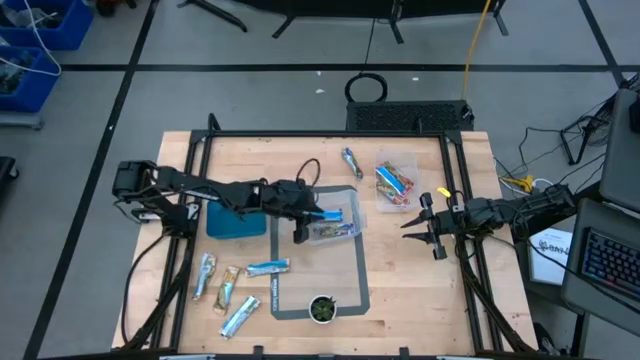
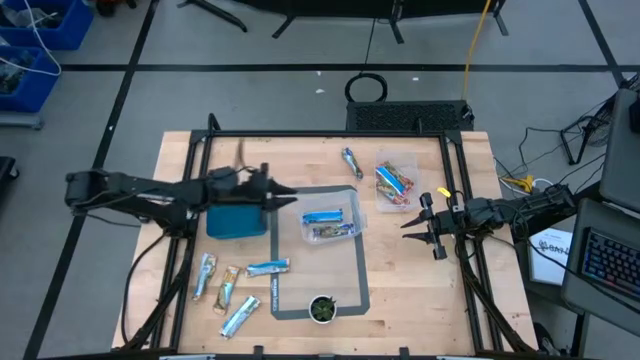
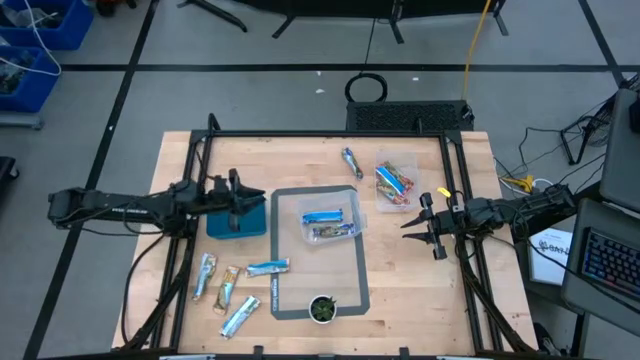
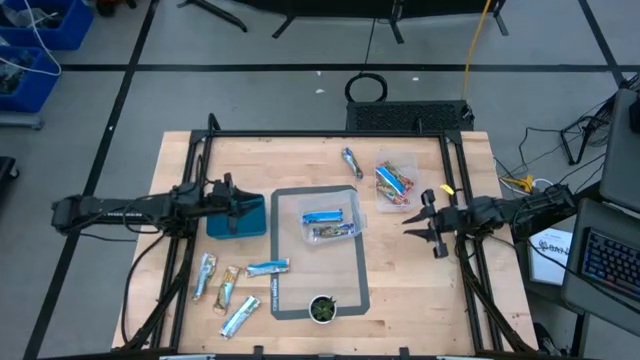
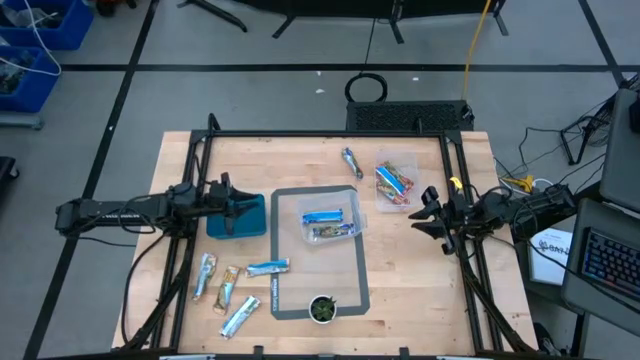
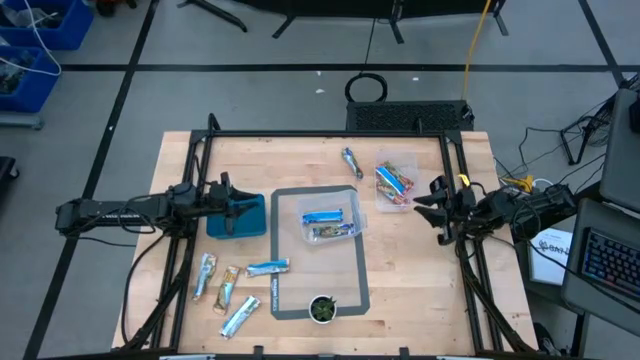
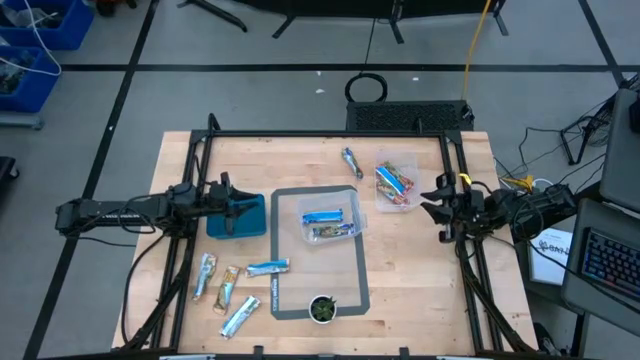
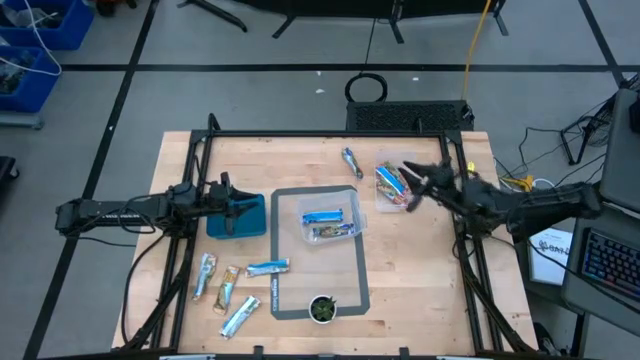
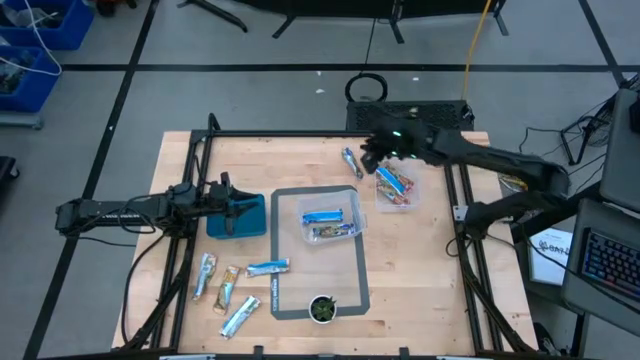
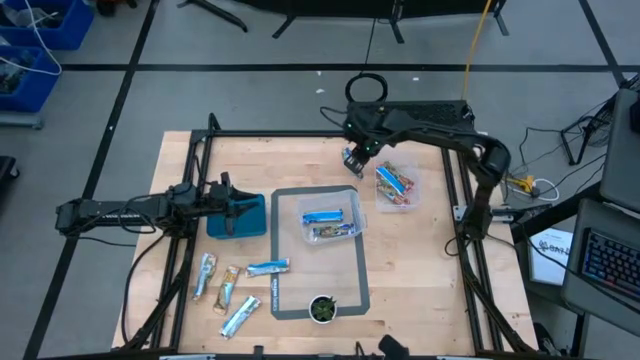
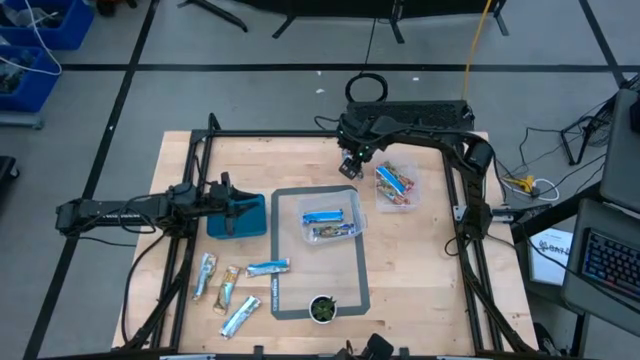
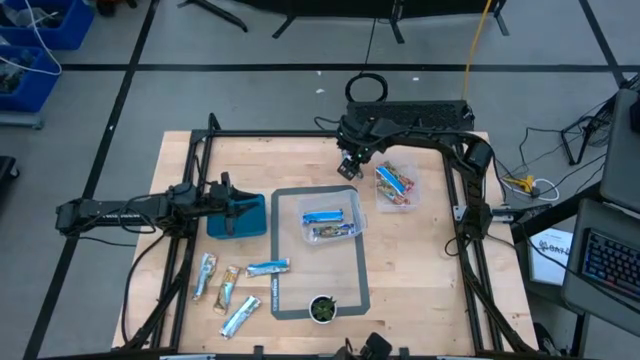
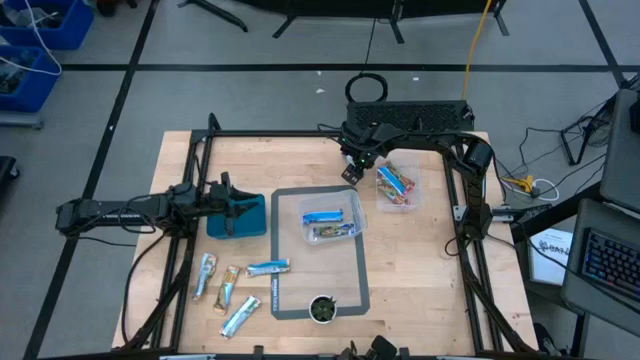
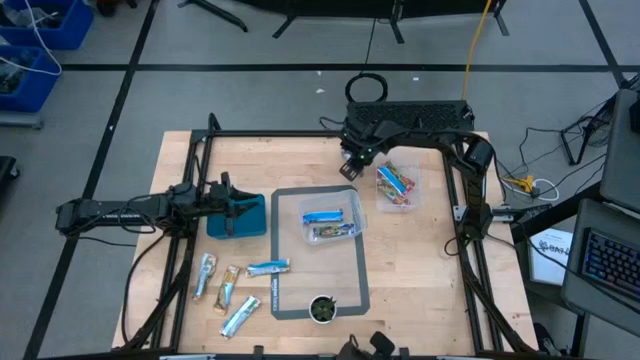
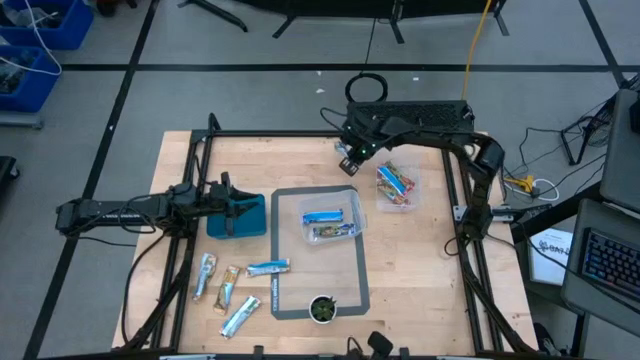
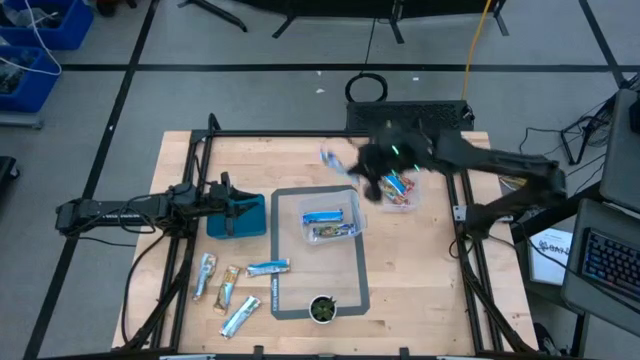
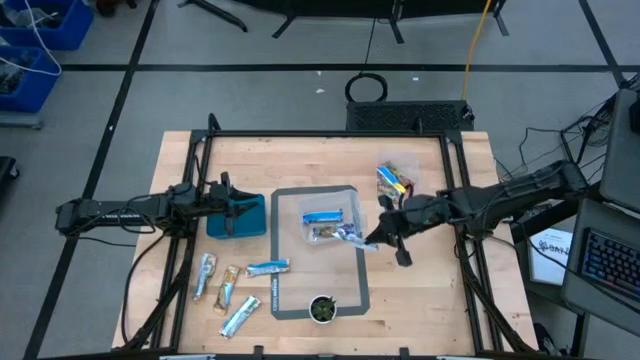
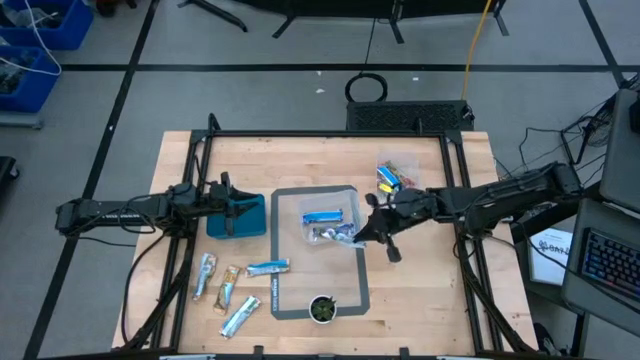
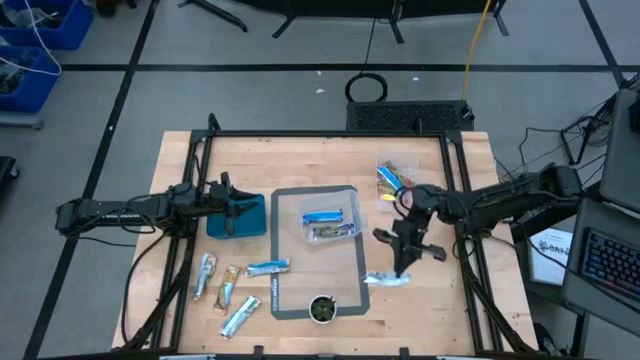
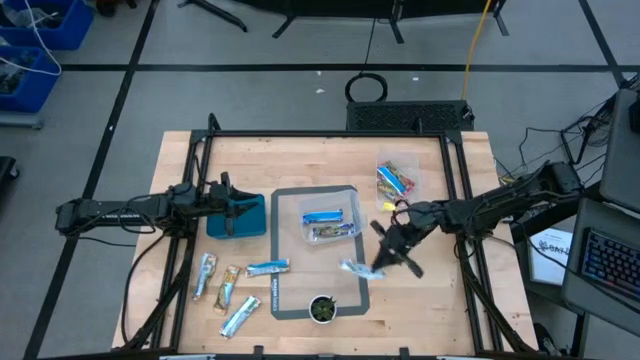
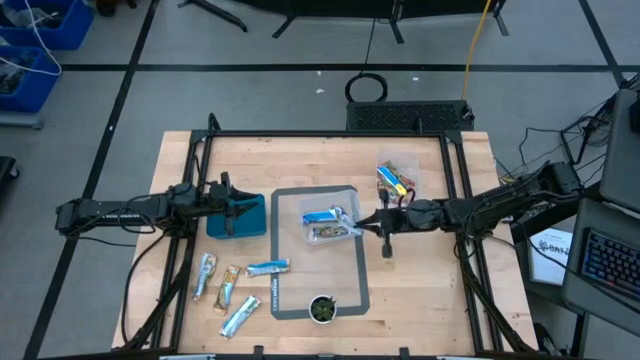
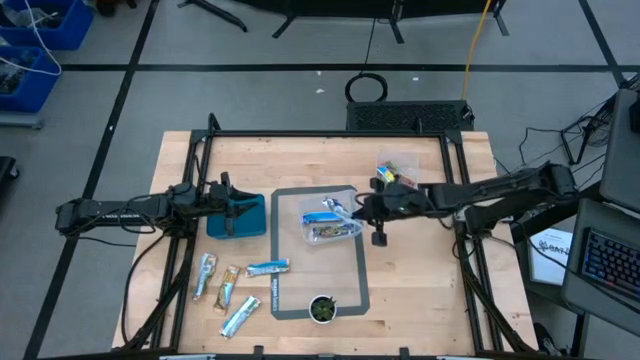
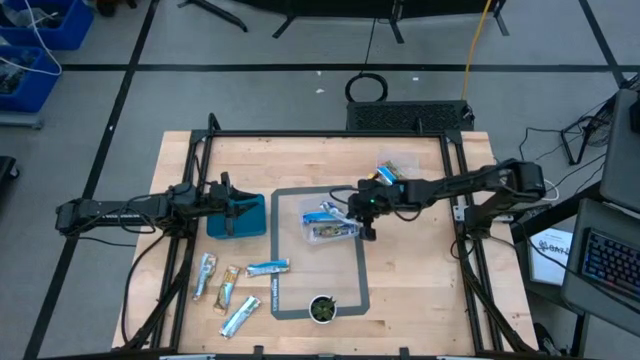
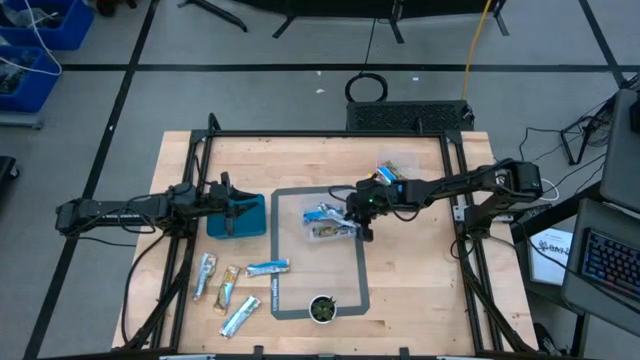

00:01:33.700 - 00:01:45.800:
Task: Pick and place Granola Bars by type
Put the blue granola bar into the left transparent bin

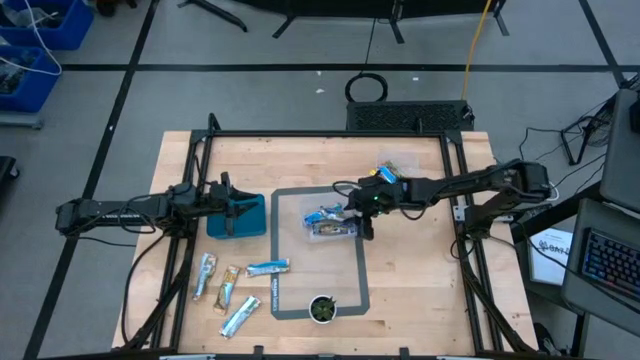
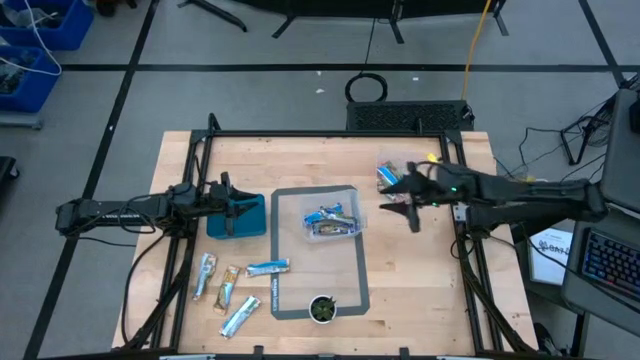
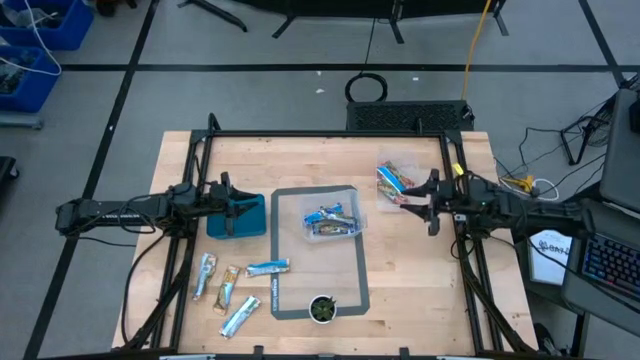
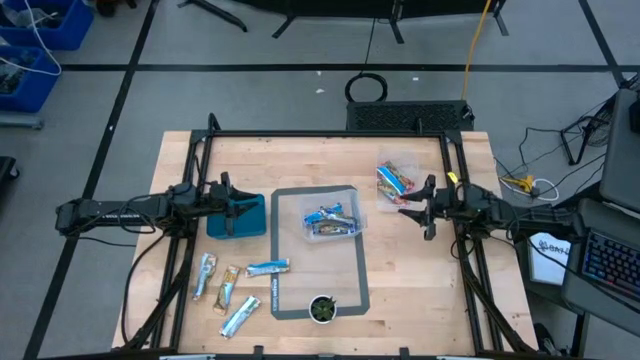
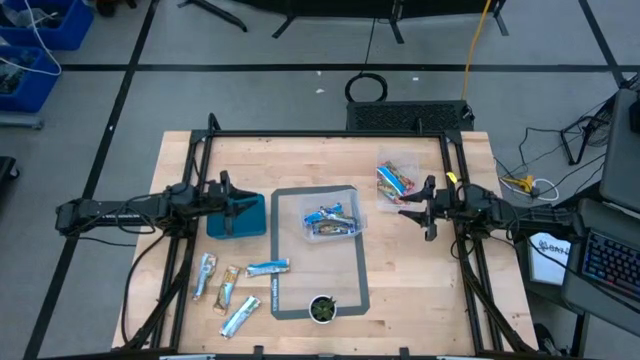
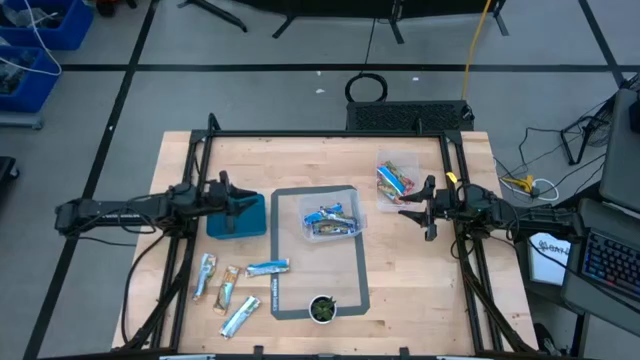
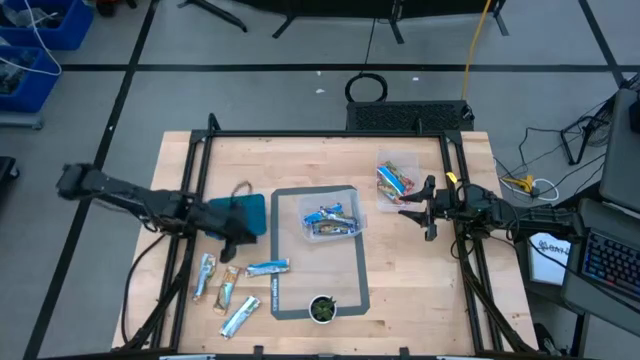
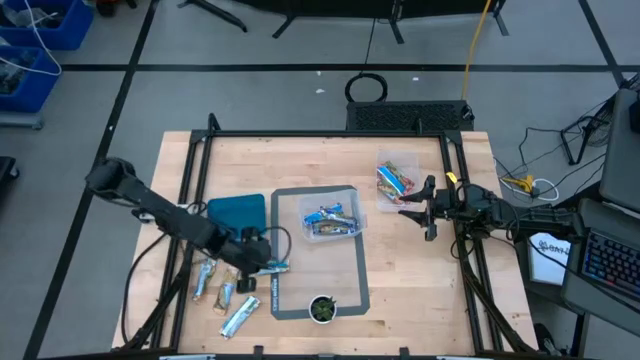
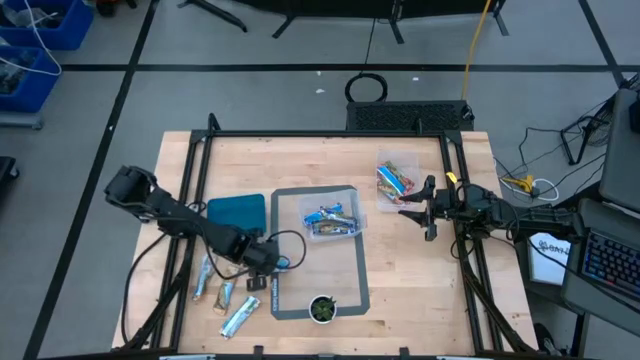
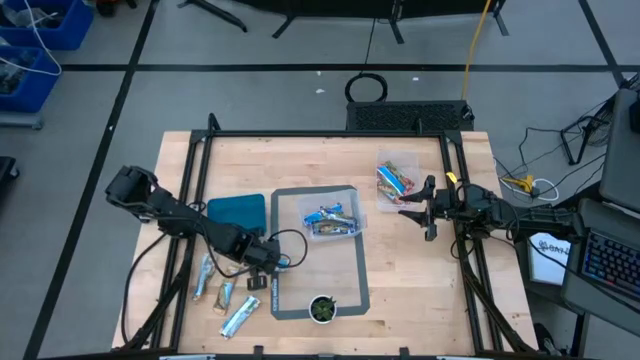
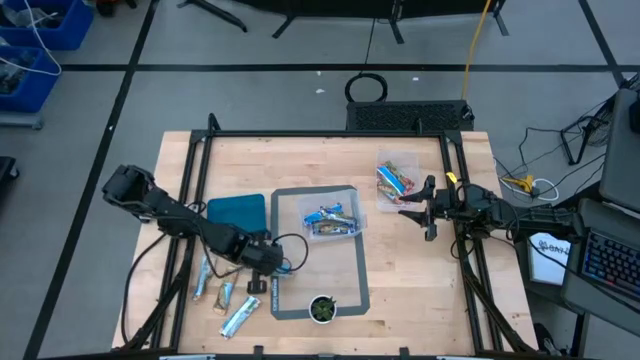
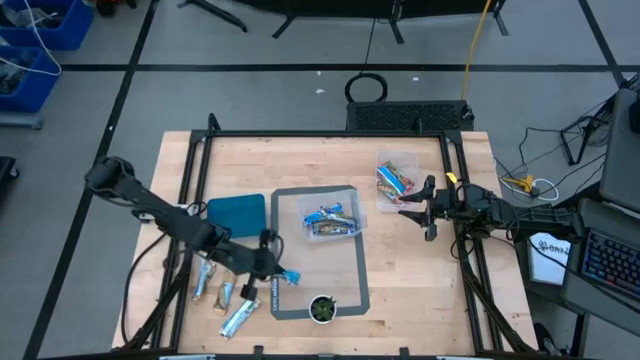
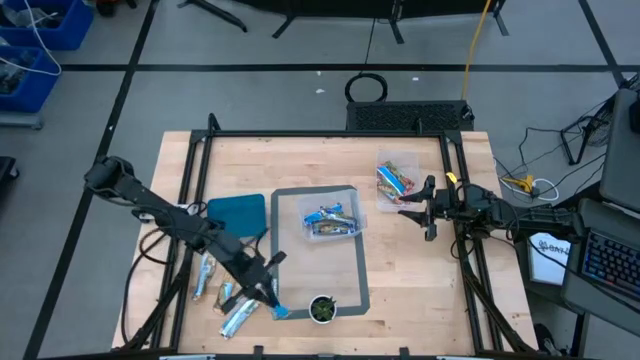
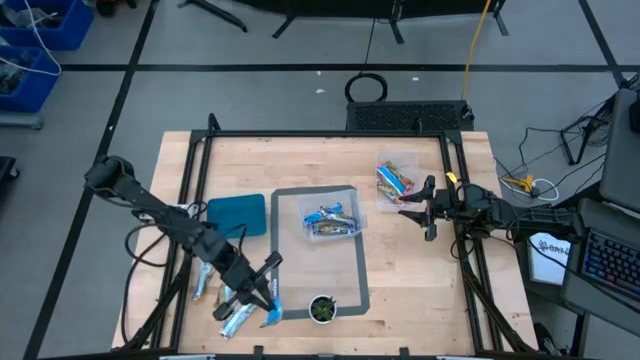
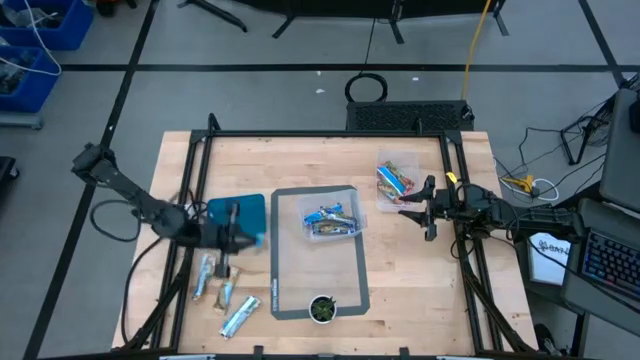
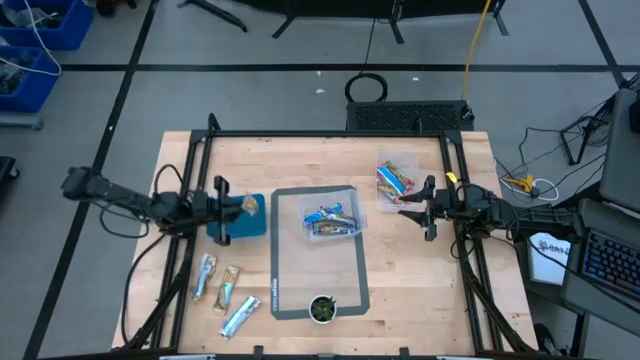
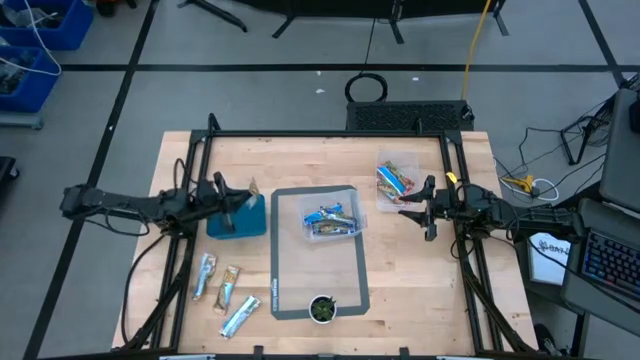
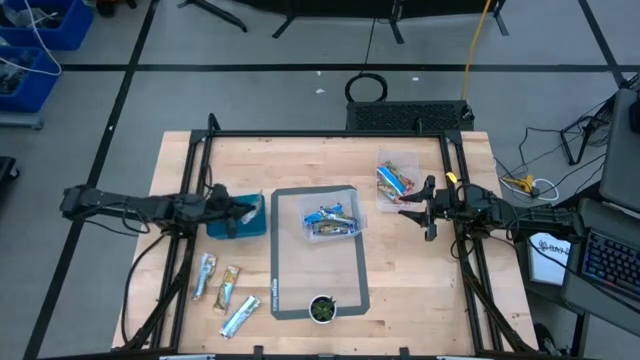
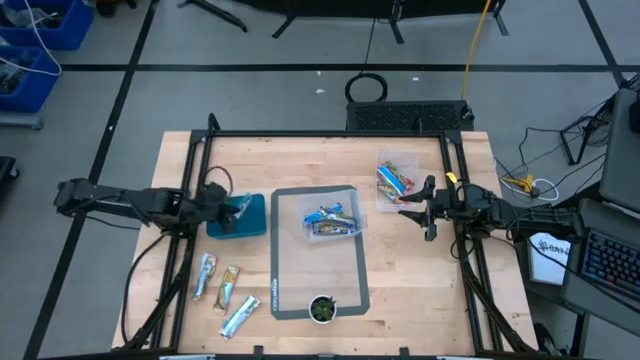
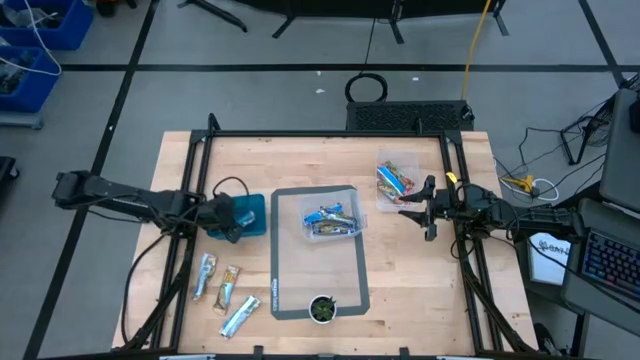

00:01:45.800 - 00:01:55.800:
Put the orange granola bar into the blue bin
